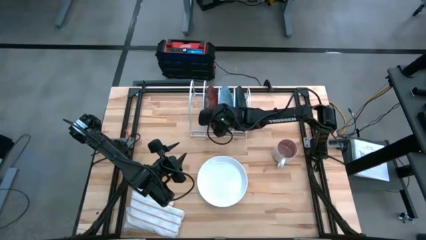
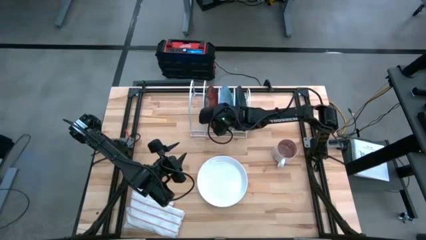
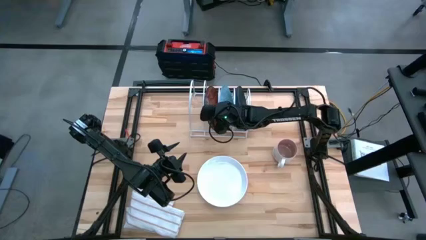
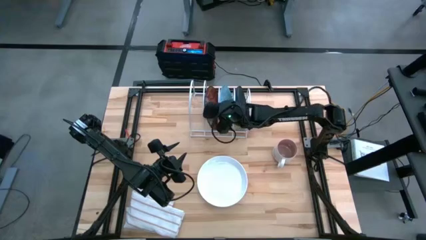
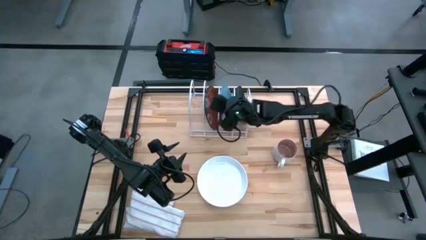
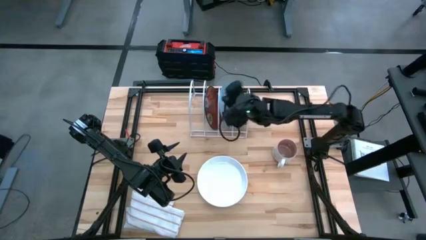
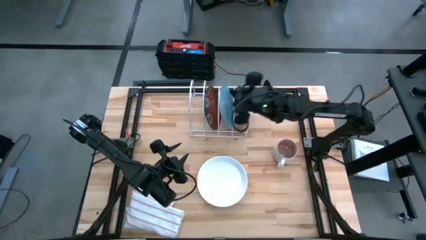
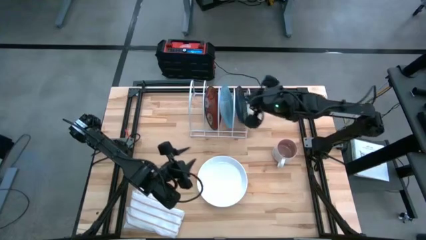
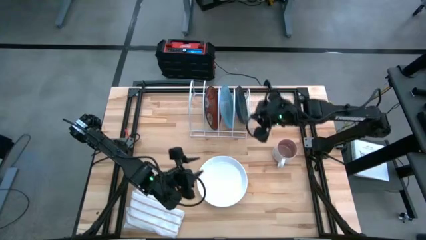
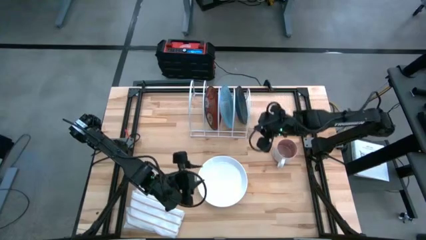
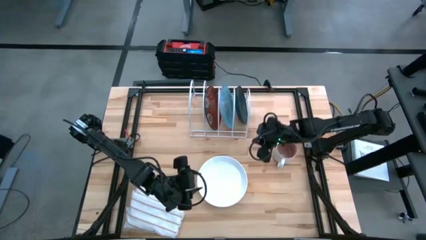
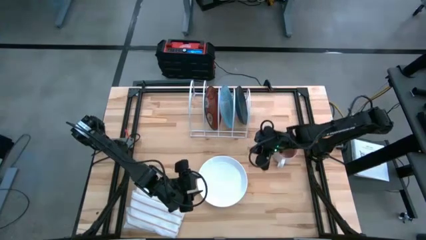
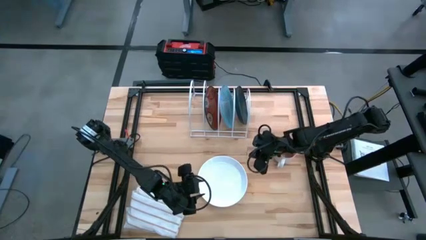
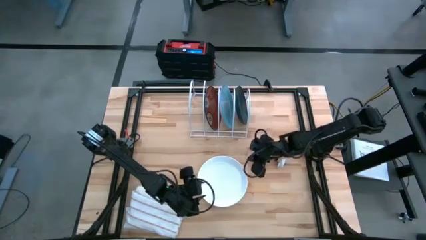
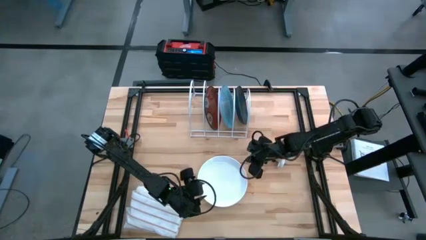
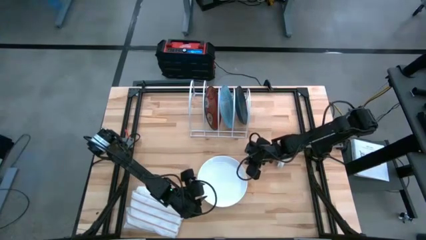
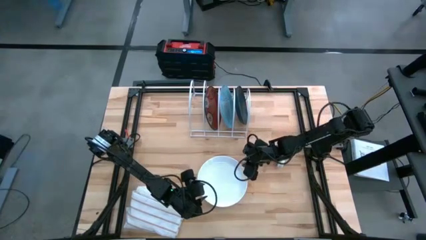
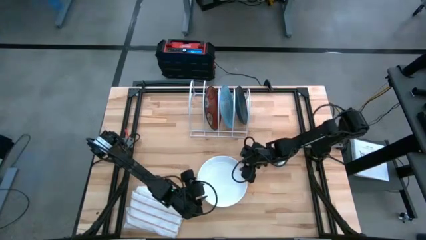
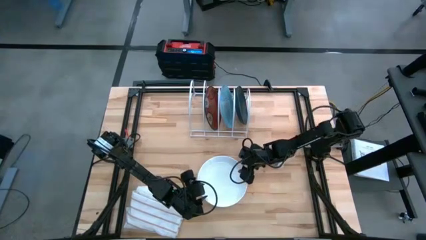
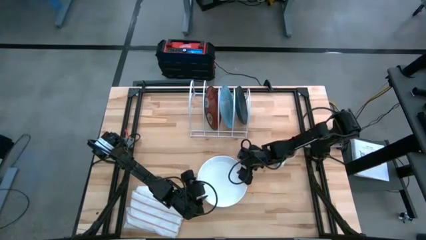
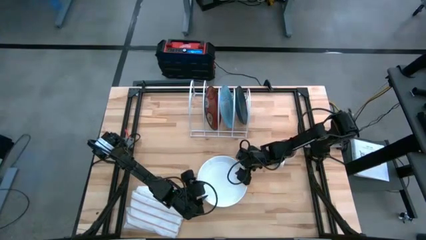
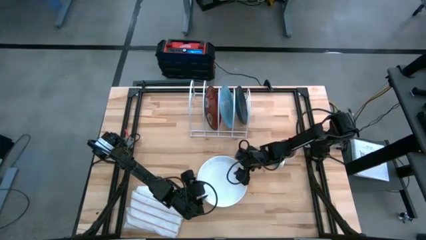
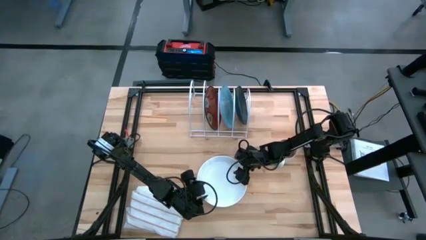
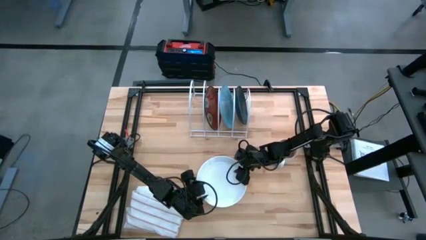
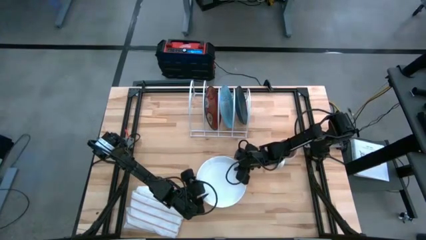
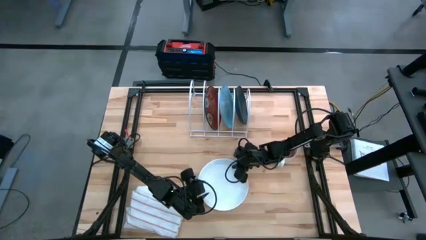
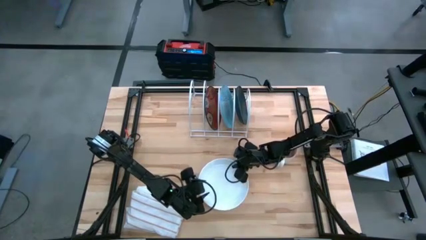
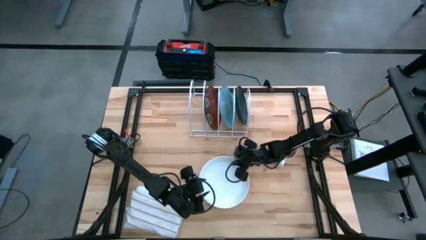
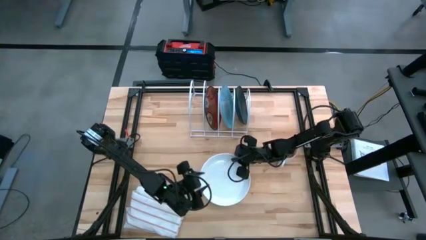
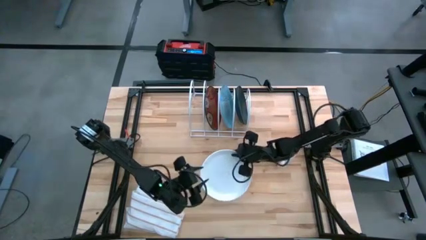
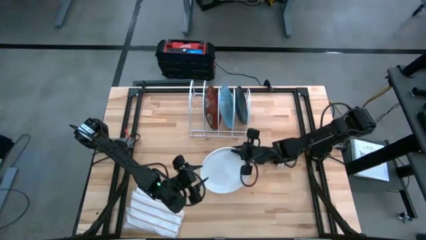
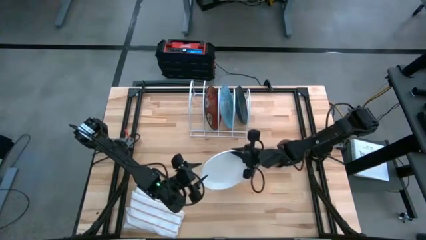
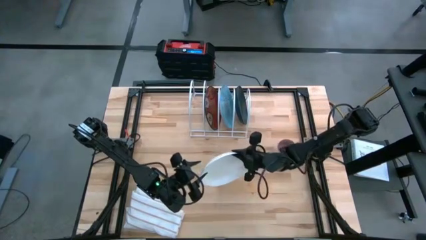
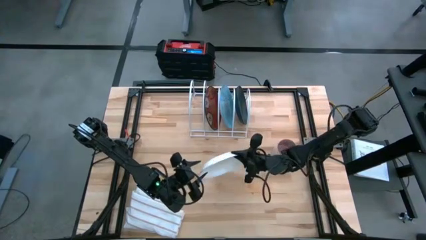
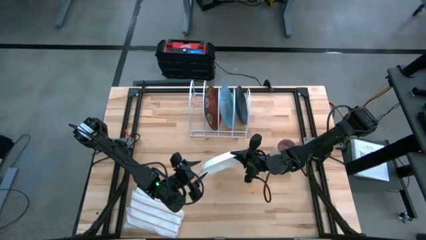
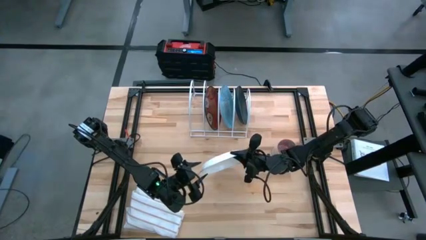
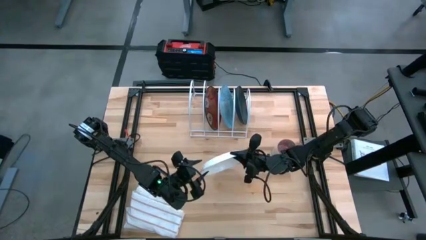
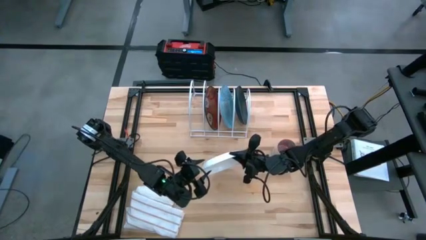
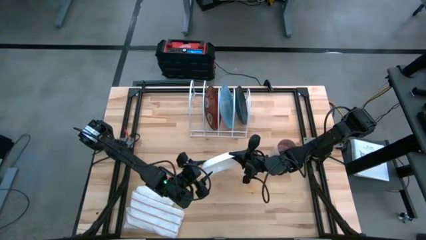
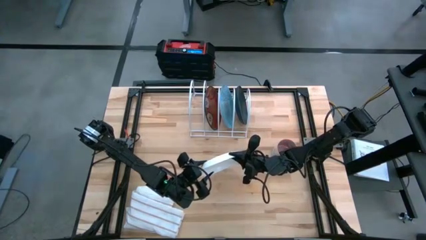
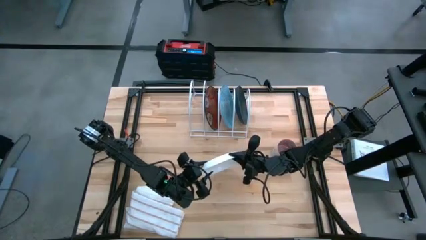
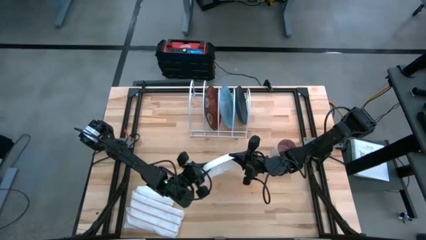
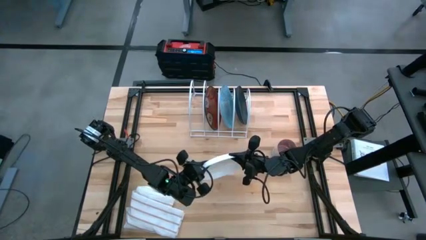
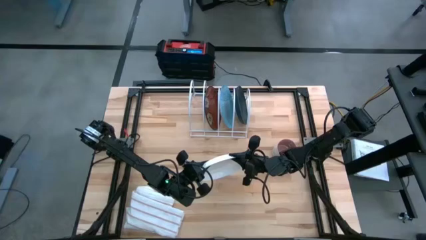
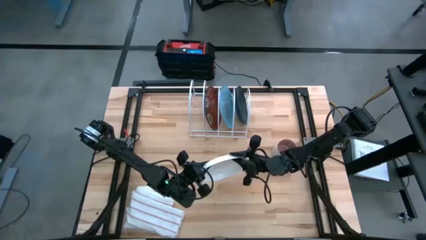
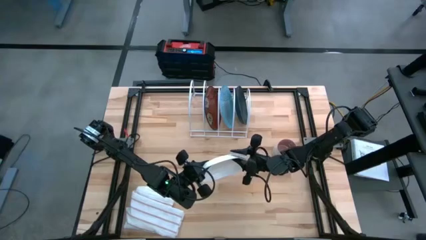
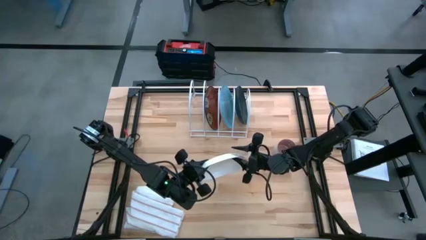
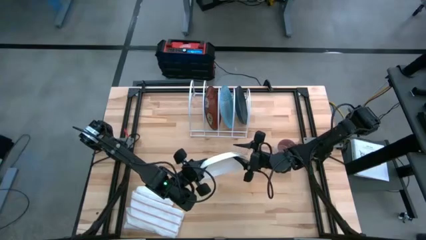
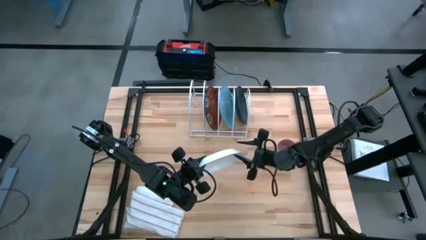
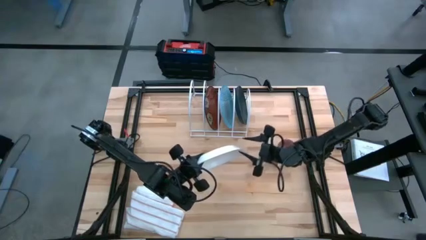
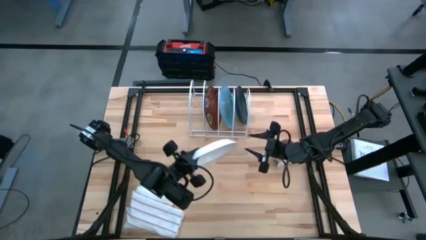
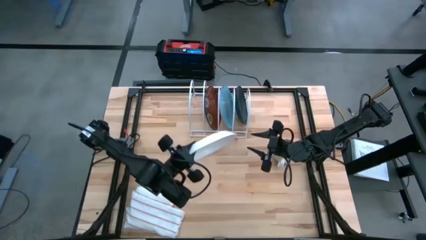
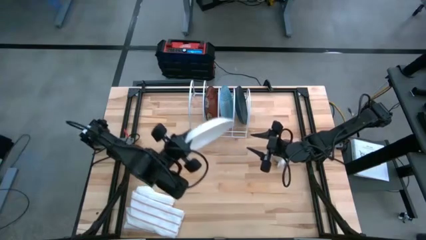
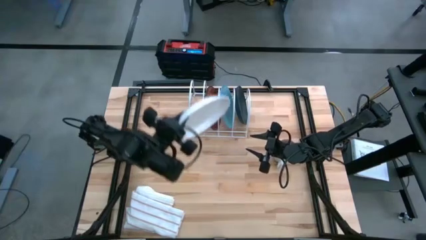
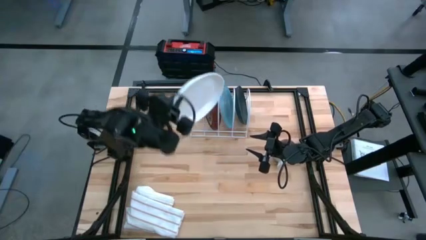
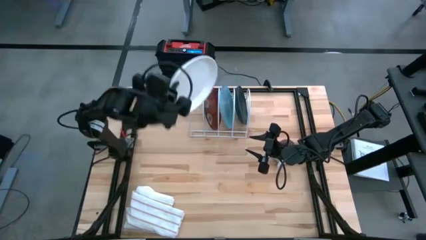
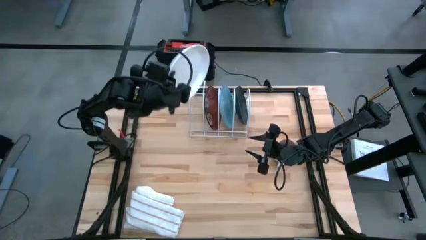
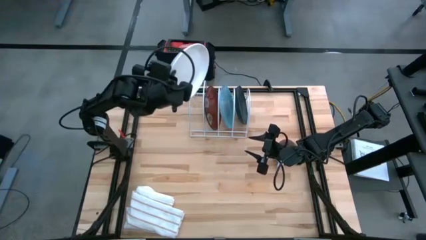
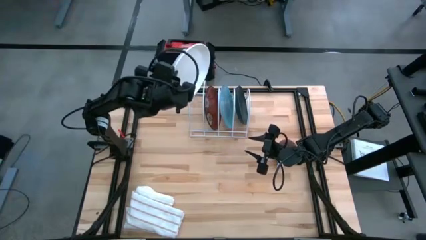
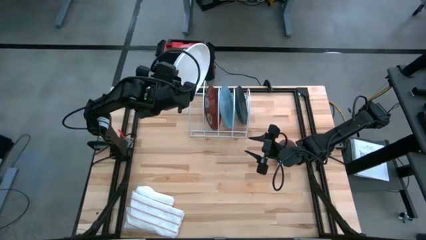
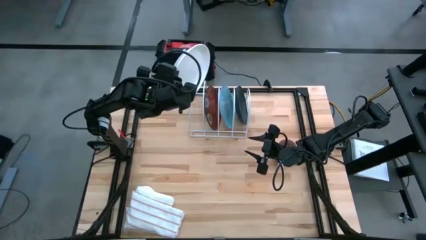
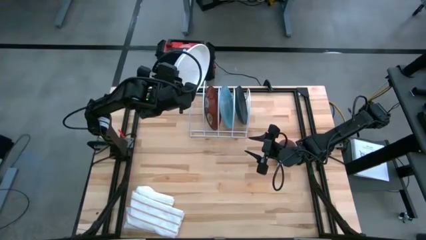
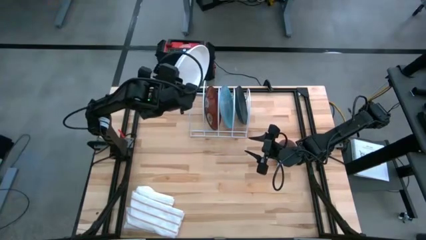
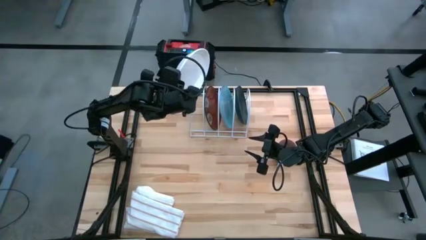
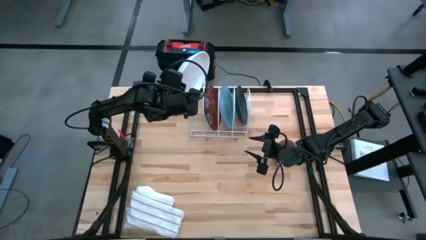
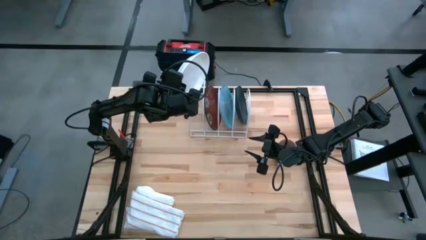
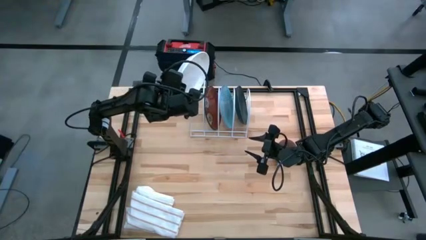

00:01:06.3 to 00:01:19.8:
Task: Sort dishes
Put the white plate in the dish rack

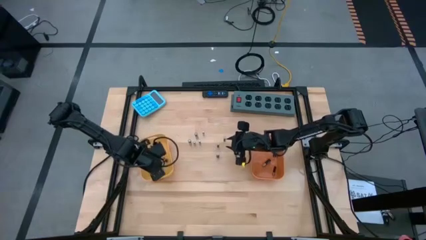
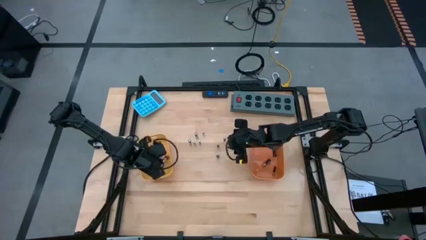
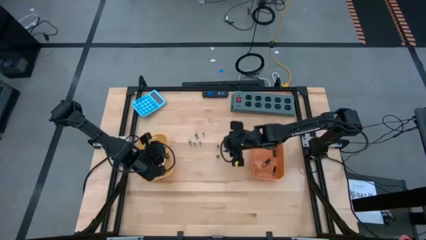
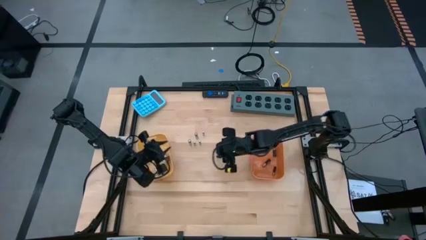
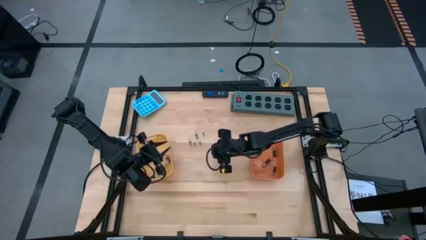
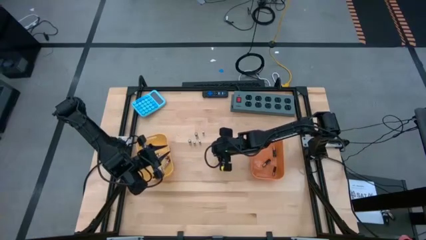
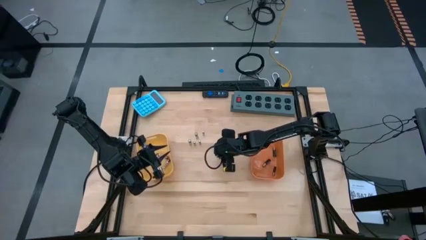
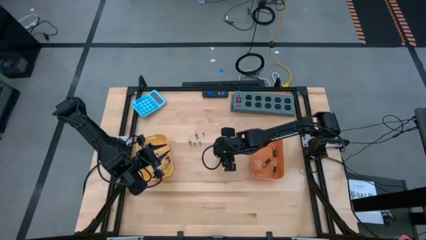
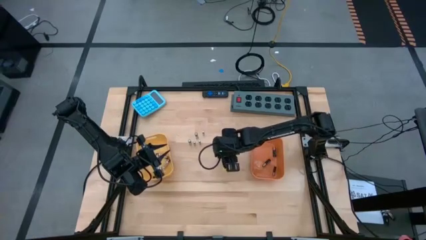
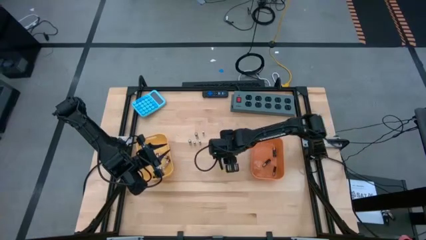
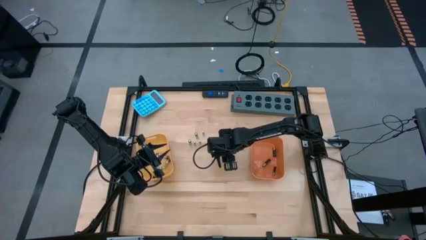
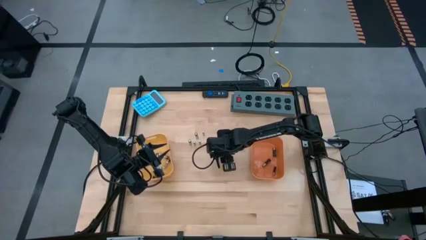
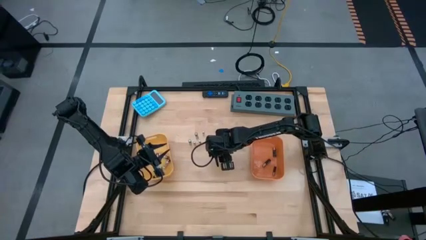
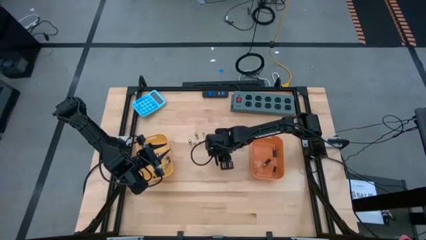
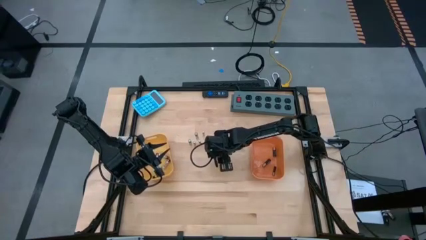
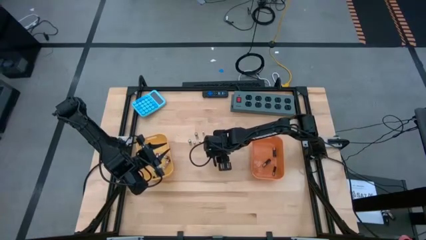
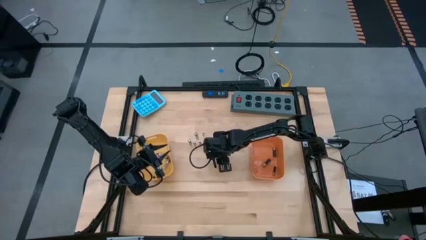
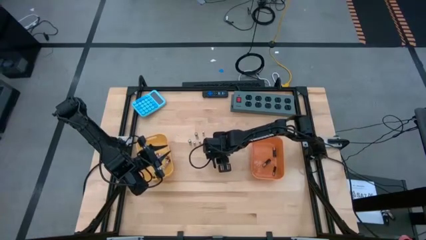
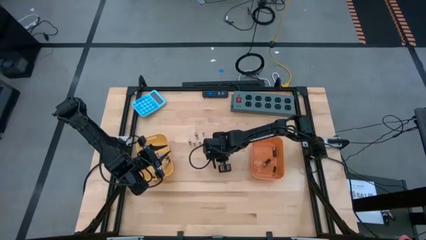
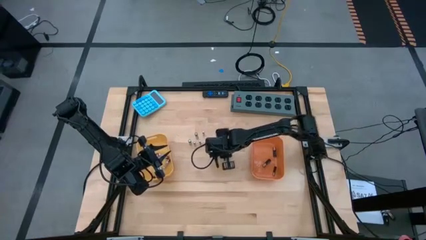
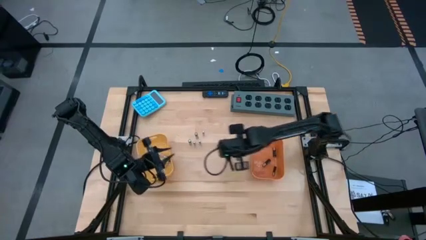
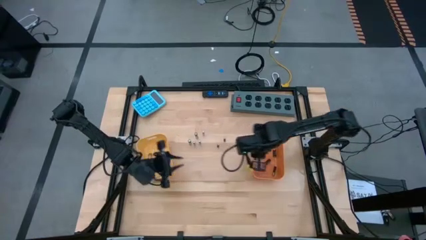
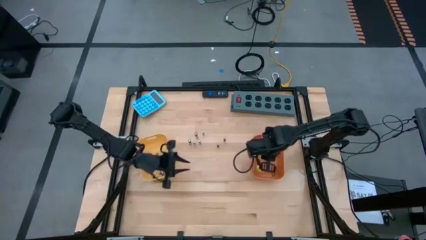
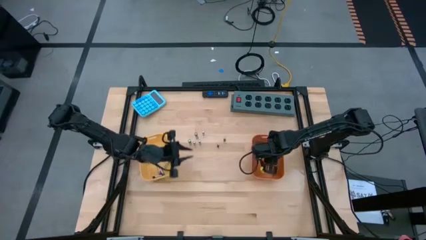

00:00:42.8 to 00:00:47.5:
Task: Sort batteries
Put the brown battery into the orange bin
